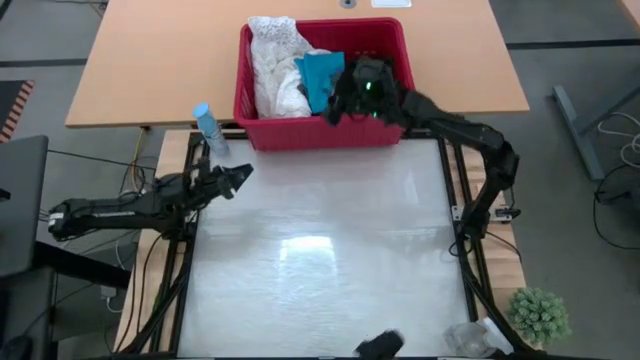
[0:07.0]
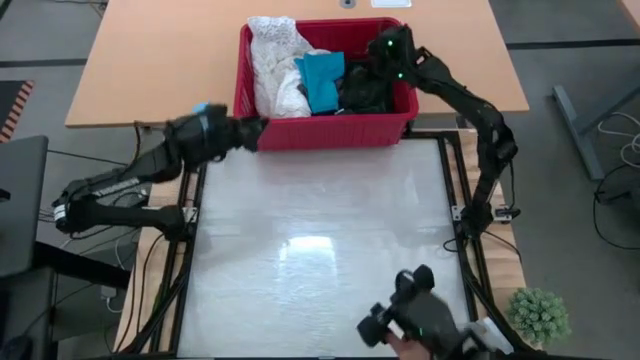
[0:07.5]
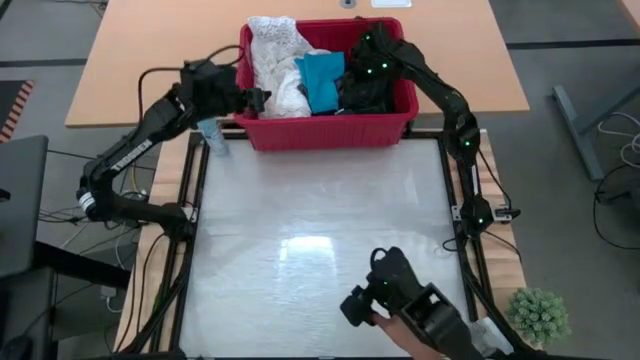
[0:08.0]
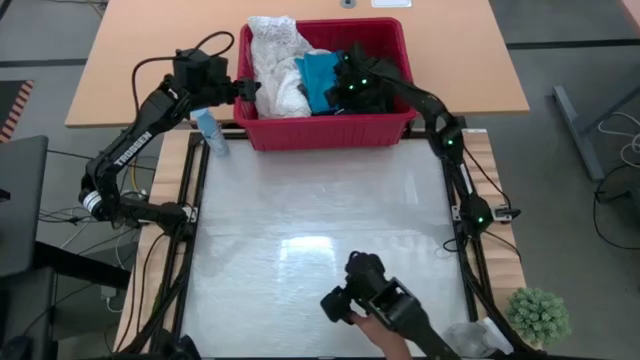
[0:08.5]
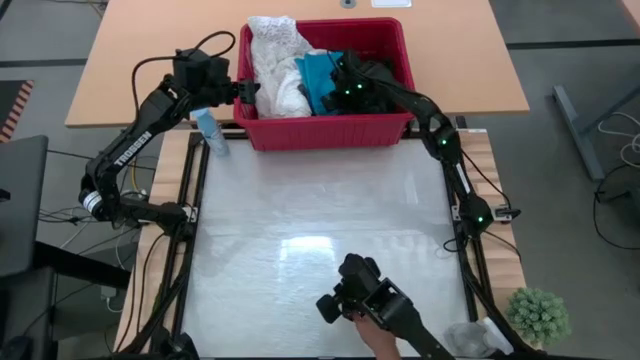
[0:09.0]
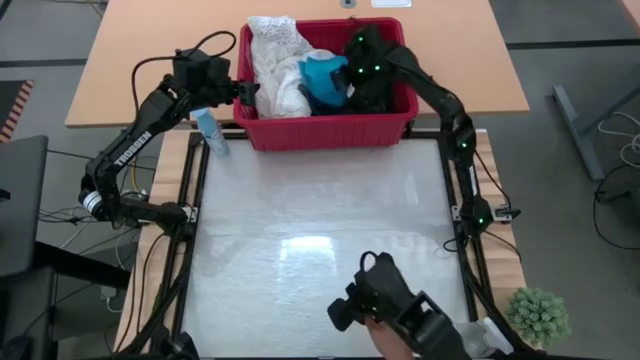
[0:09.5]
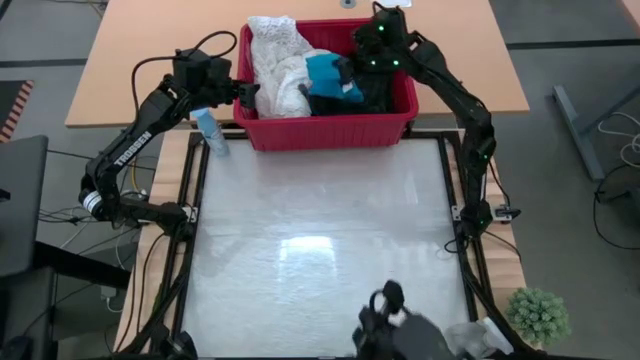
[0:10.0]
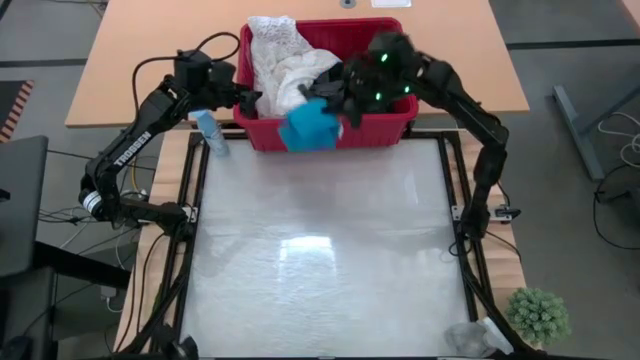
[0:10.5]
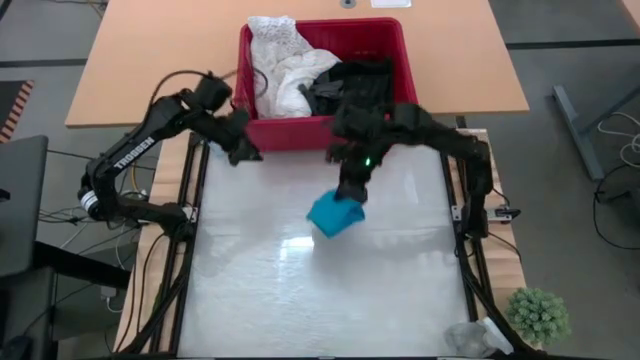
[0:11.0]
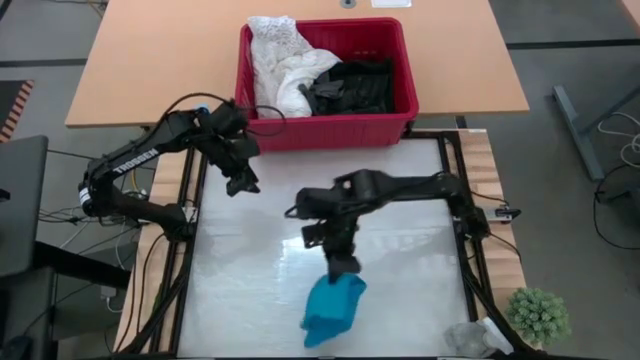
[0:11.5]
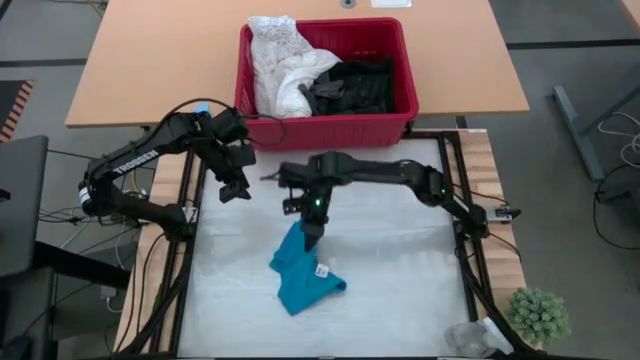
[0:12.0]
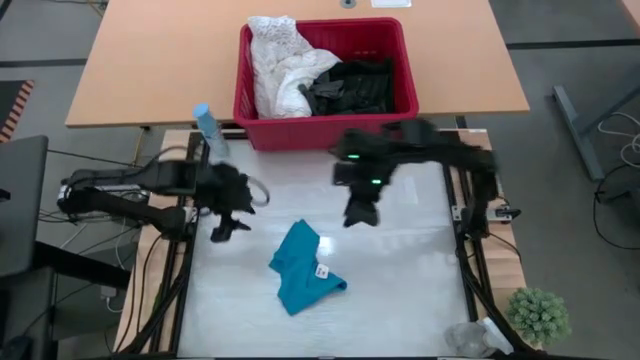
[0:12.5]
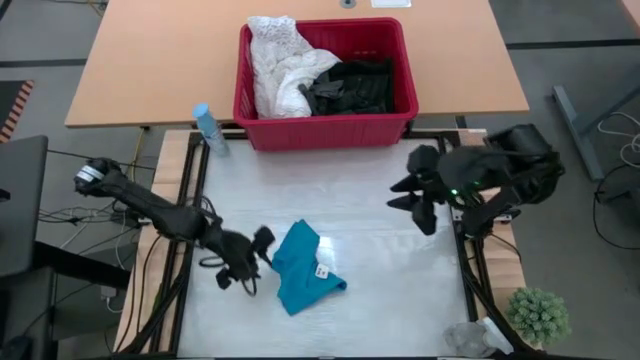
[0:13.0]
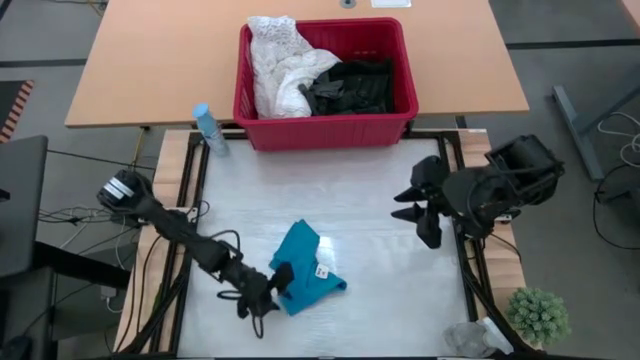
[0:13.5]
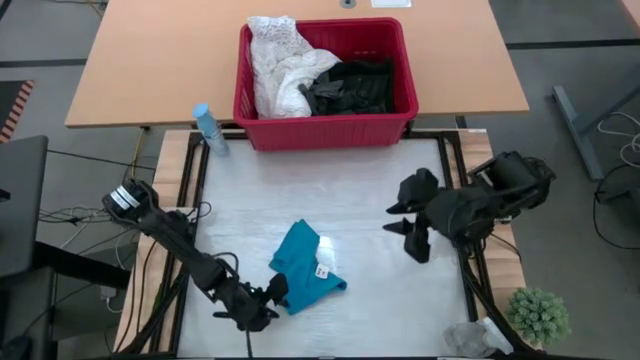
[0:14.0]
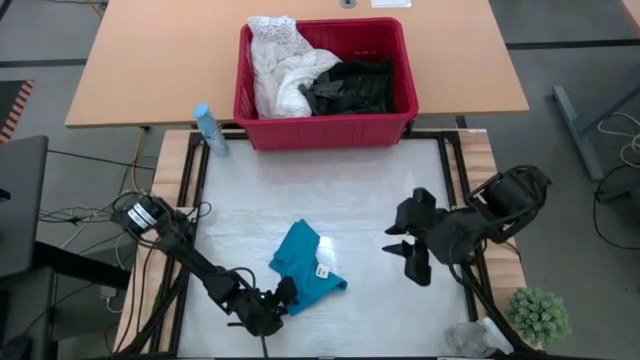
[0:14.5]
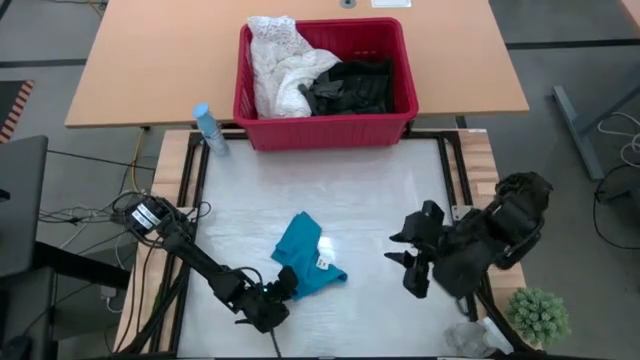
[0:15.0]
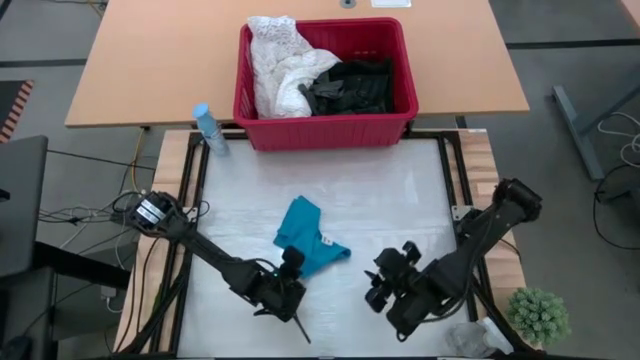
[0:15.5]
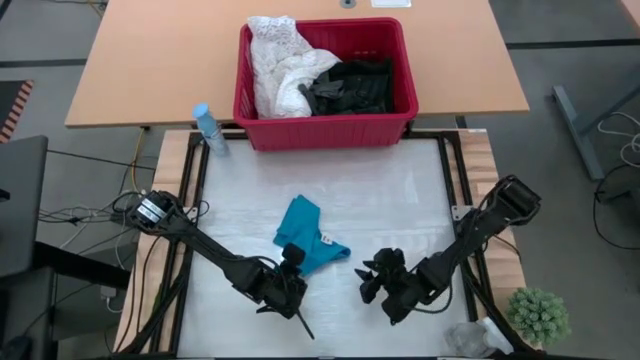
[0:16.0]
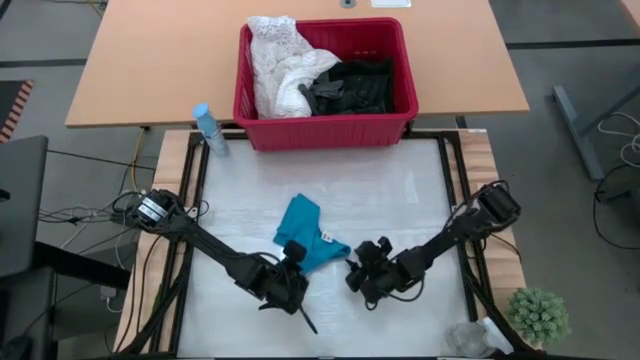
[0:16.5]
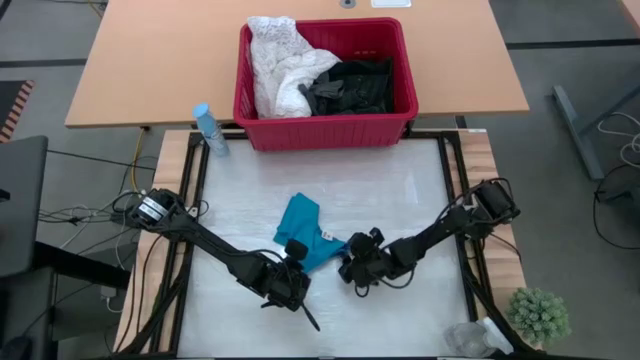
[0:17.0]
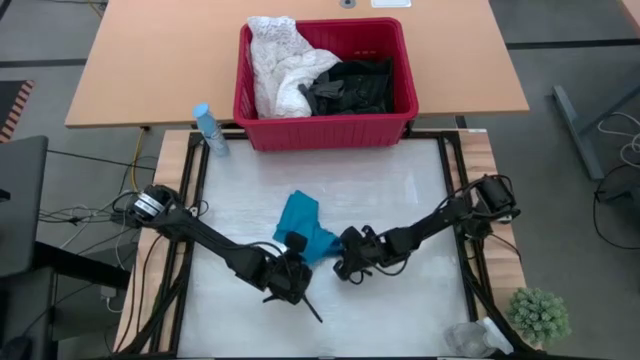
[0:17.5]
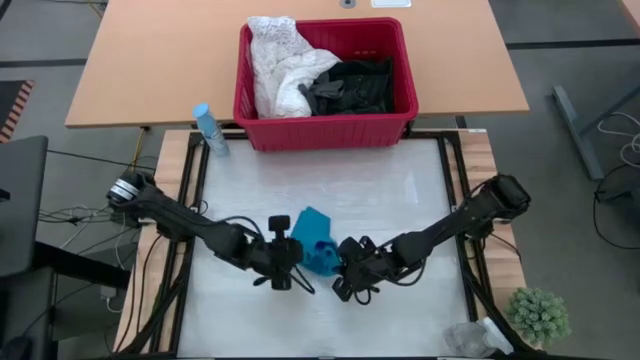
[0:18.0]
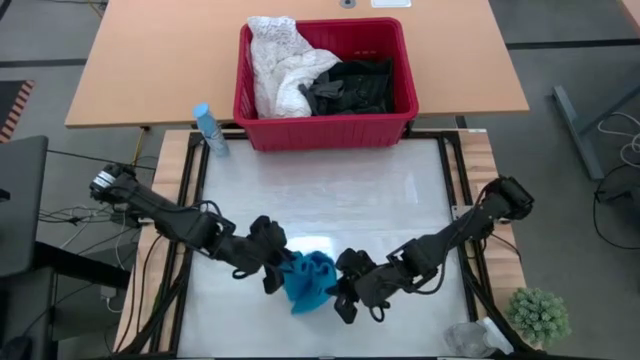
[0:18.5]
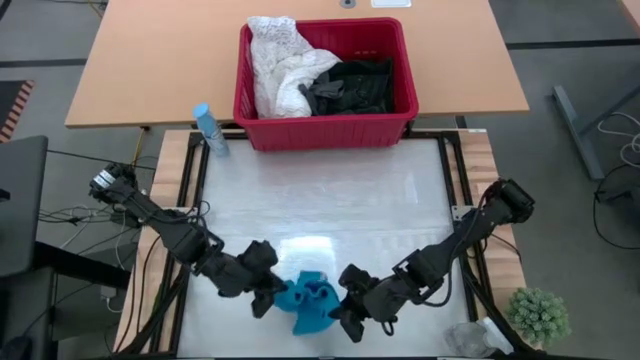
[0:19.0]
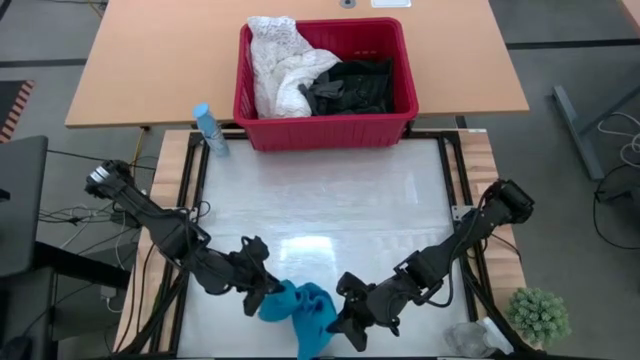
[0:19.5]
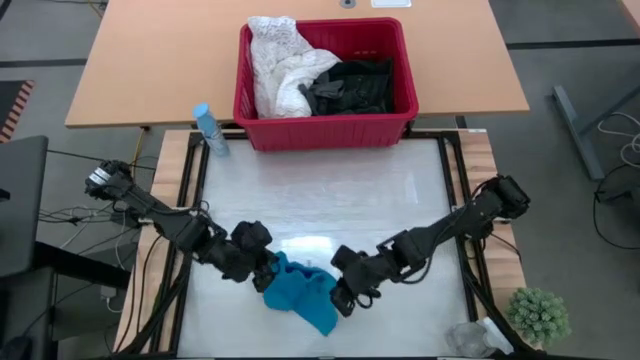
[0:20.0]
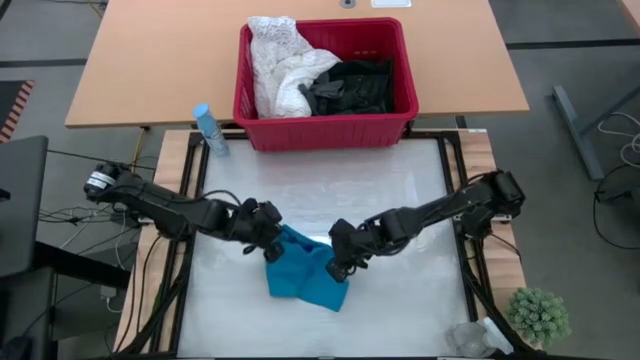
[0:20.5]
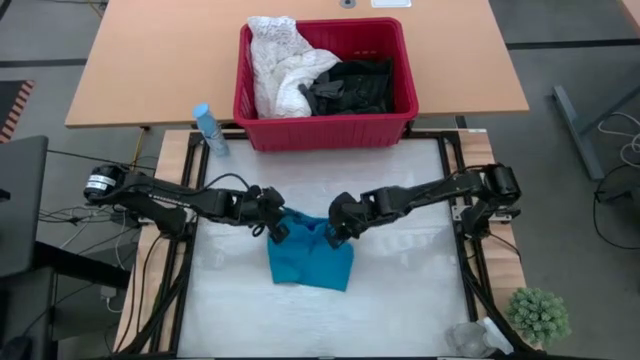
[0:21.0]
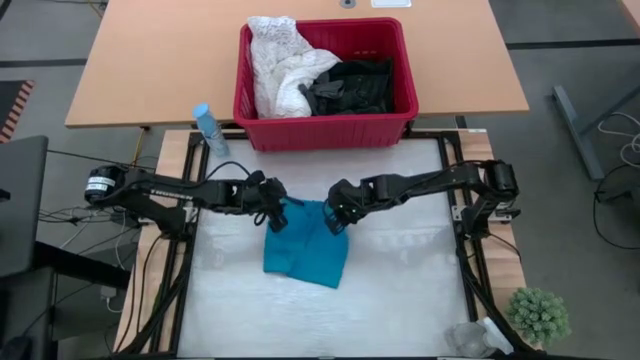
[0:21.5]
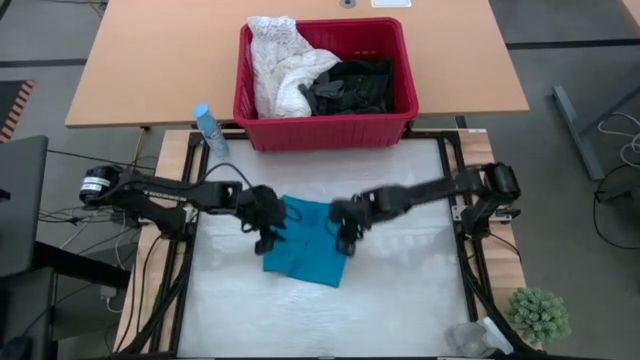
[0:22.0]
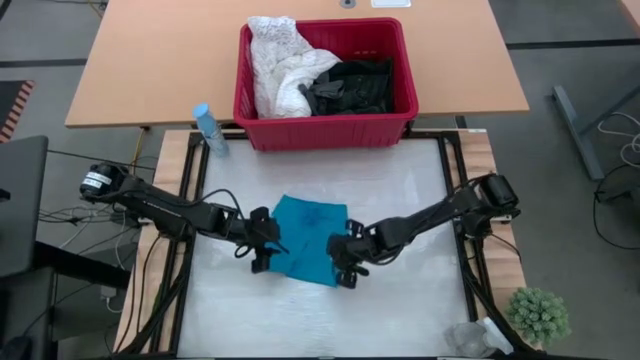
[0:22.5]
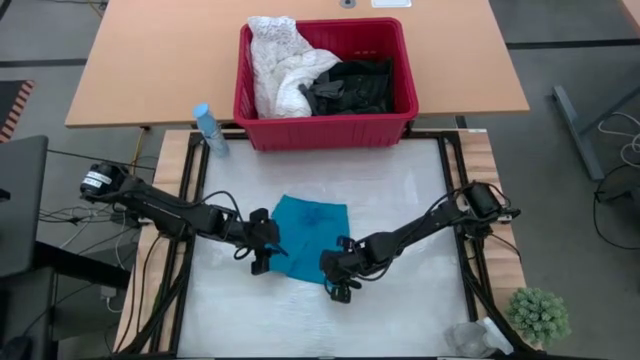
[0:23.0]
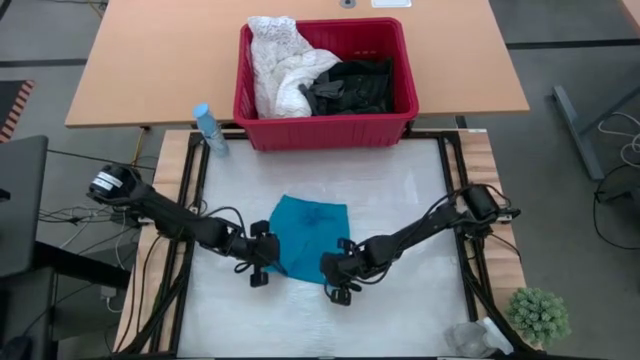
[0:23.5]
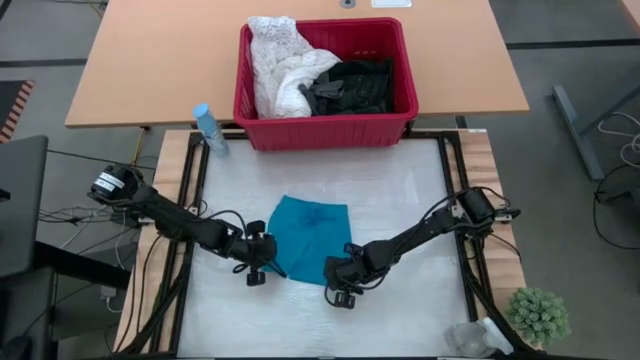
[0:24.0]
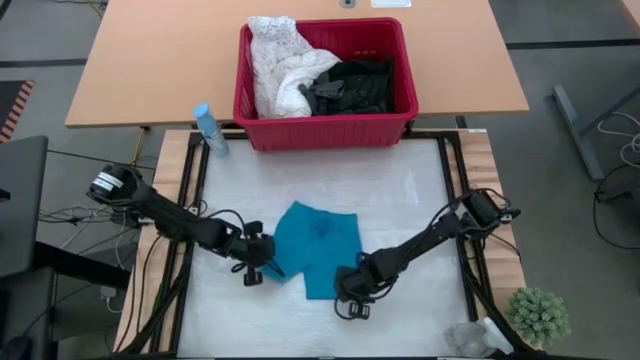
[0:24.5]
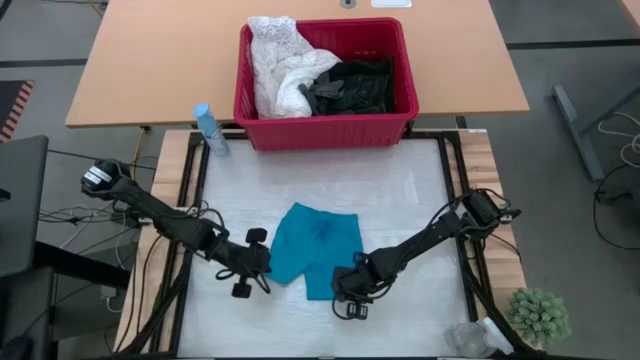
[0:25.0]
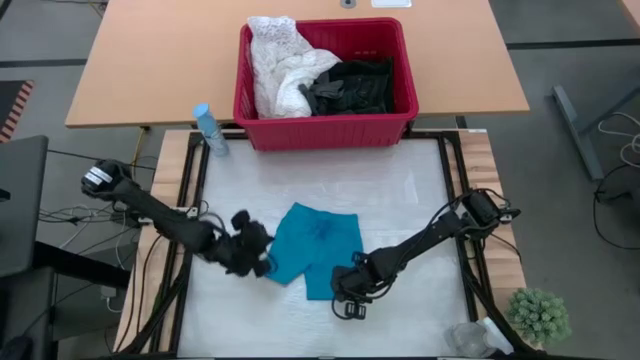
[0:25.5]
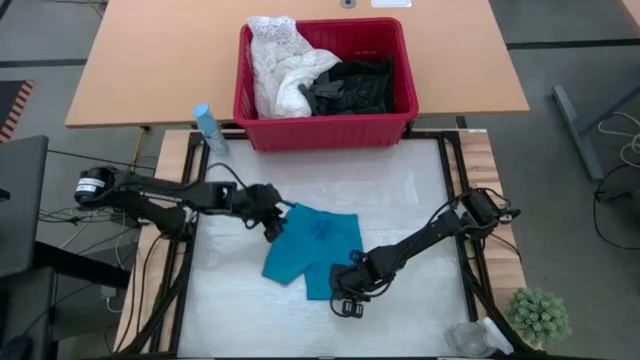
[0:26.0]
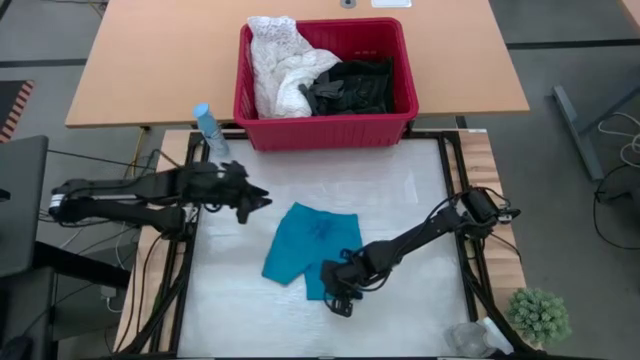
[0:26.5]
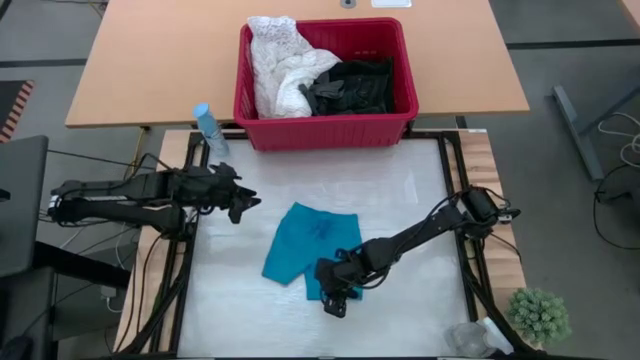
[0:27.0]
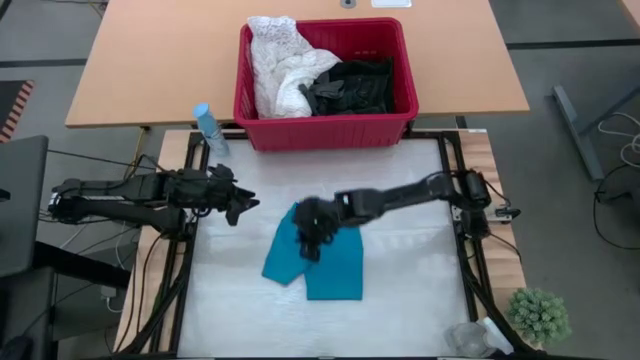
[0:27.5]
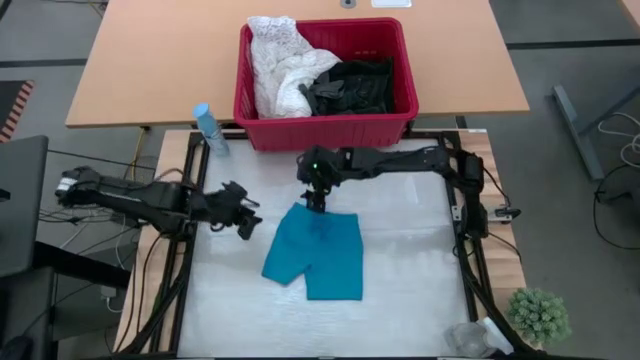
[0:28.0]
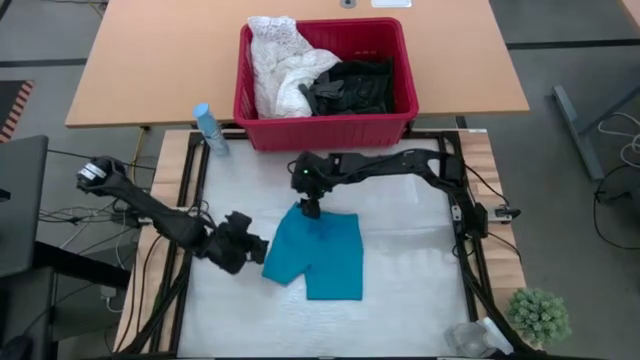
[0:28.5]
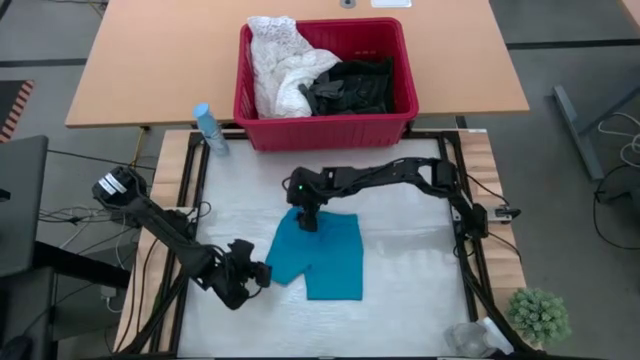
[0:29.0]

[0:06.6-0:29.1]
Task: Fold laundry
Fold the blue shorts
